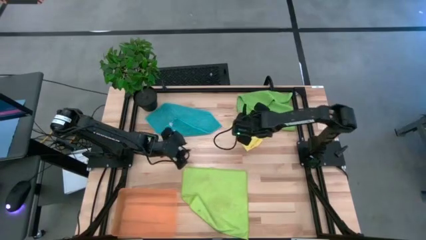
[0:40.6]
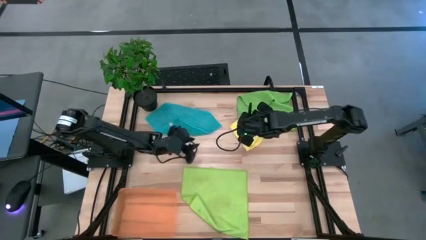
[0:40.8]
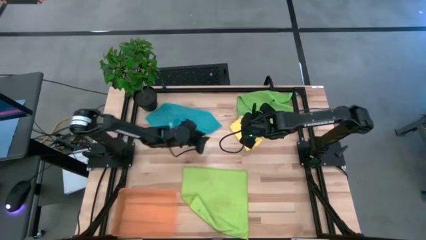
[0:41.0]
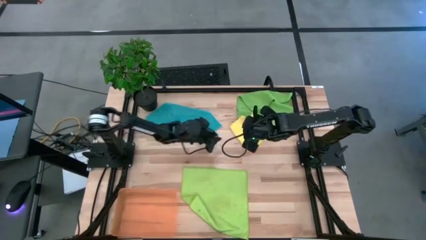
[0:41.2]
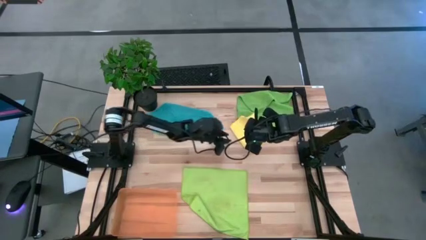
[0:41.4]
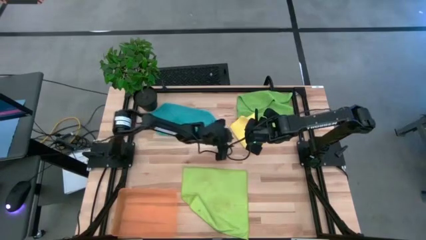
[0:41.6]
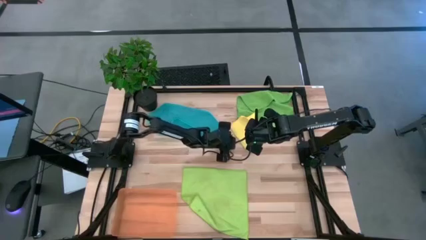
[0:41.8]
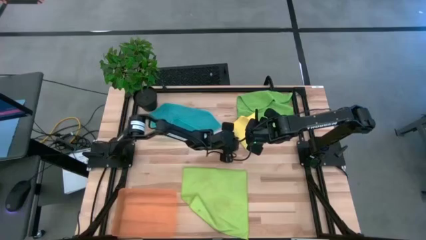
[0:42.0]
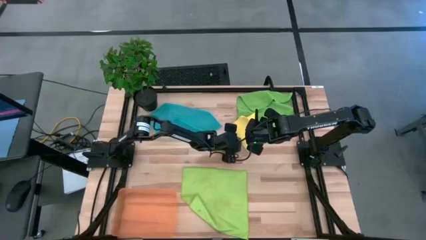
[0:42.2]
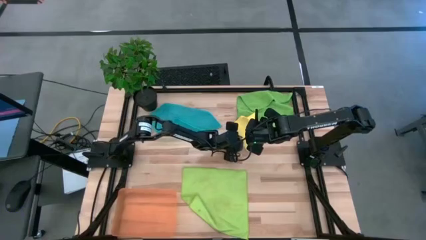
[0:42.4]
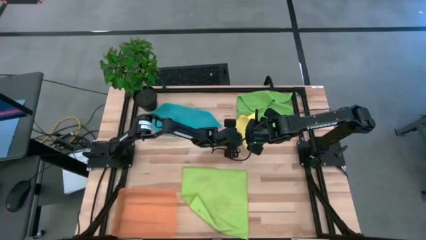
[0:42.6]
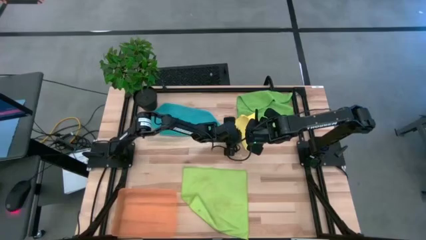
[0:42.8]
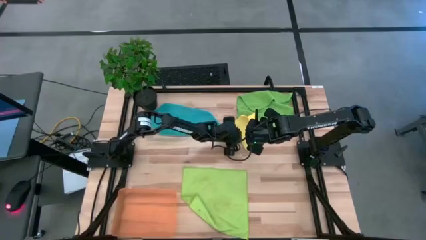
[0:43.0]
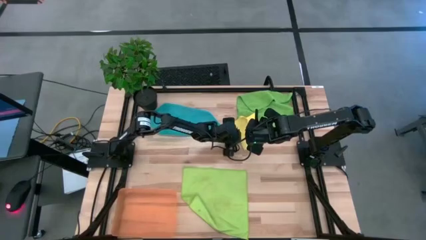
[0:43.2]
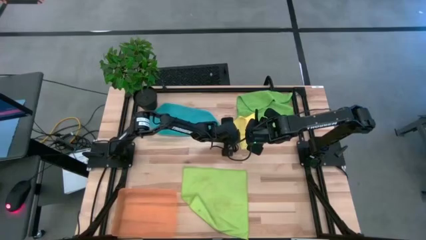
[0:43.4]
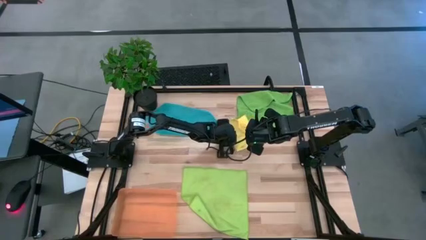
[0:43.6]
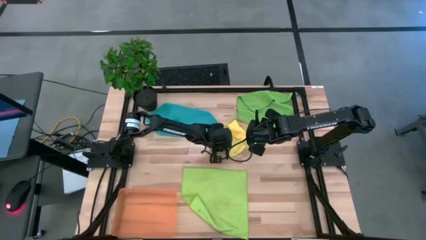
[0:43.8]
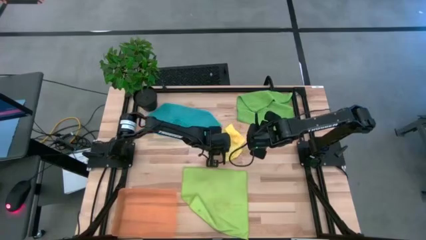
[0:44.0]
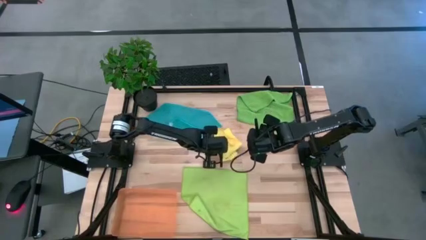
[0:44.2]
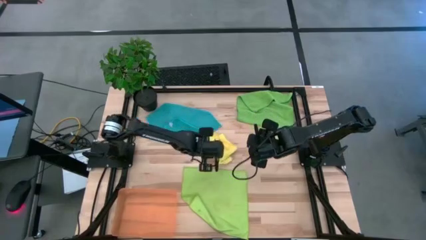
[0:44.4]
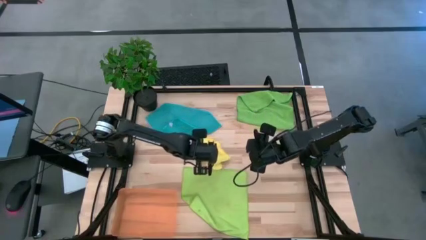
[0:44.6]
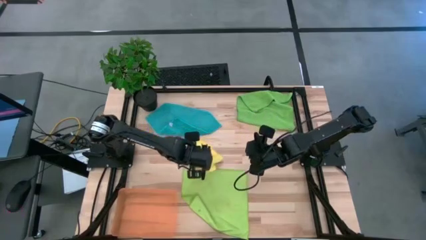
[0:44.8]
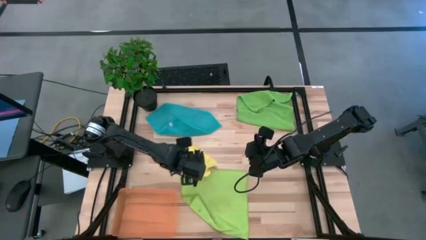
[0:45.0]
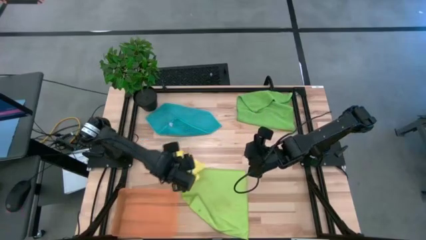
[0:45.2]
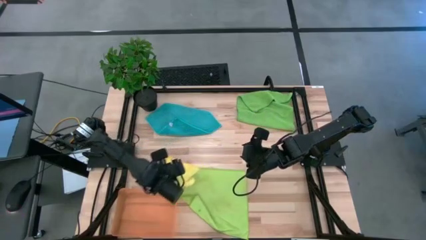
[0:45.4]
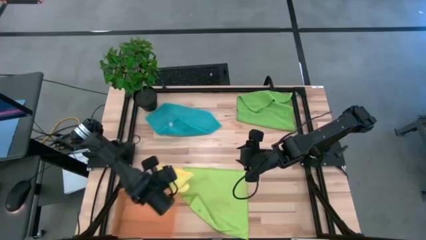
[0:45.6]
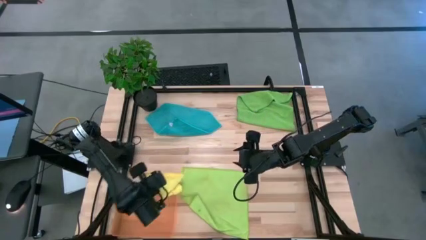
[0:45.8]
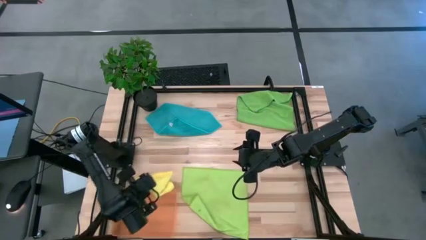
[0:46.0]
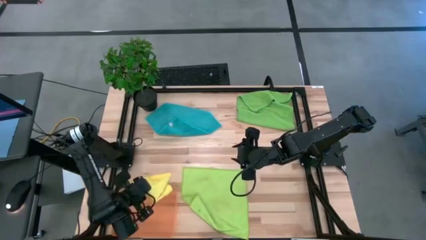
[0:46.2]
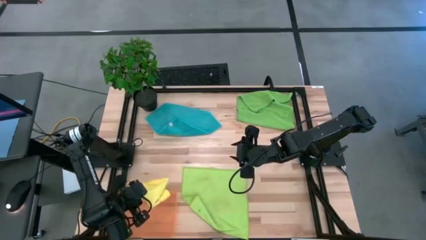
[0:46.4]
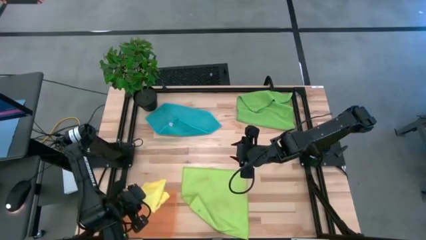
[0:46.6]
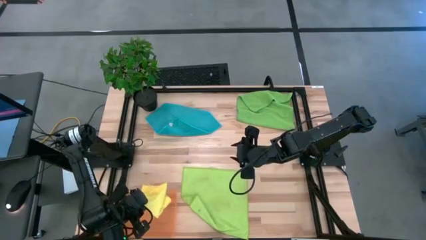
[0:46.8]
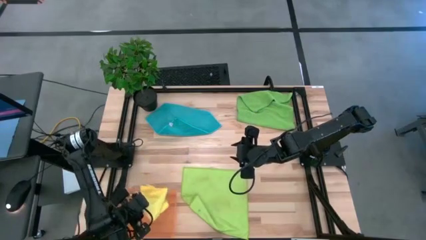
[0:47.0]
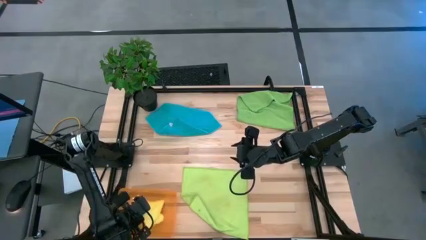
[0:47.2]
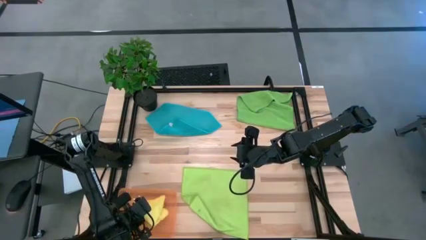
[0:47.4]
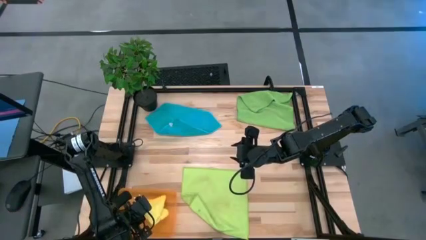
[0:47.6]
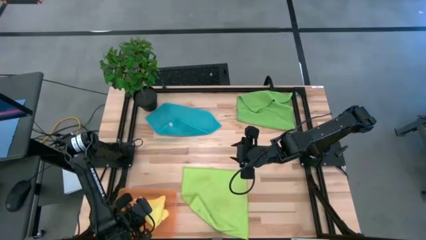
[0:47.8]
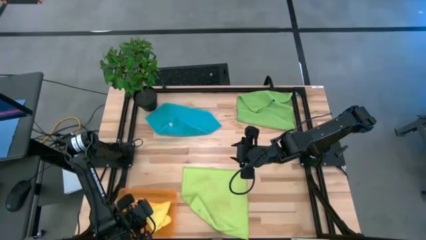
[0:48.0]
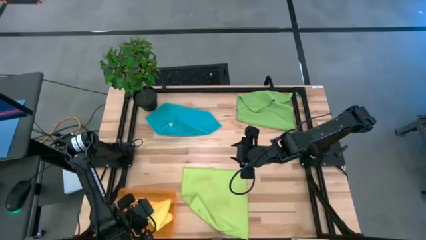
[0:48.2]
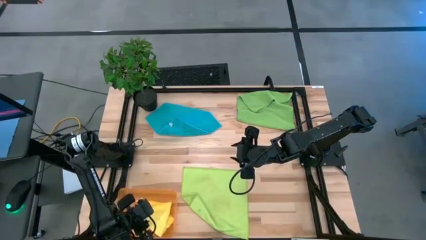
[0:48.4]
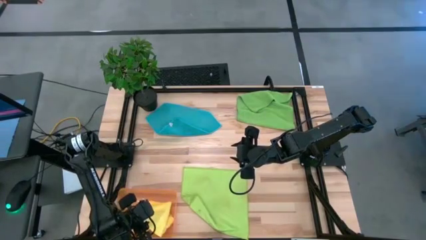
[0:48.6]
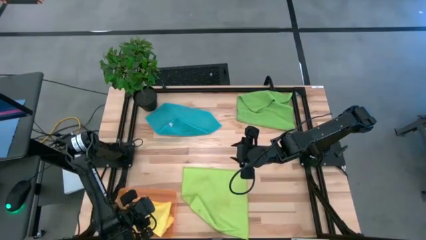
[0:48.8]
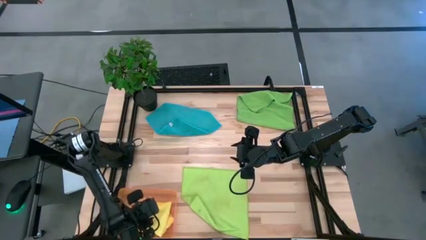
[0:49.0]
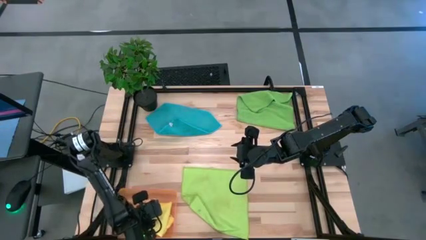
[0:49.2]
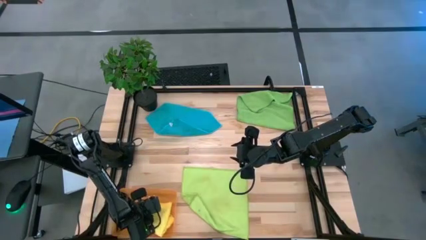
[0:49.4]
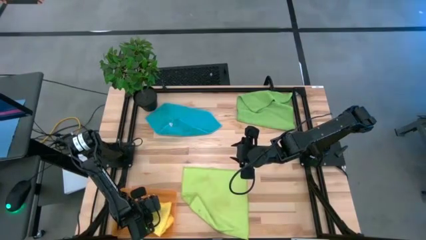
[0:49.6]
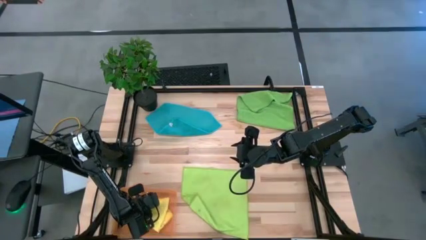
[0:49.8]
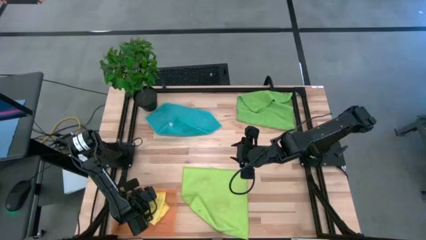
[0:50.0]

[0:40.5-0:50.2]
Task: Fold microfiber towels
Put the yellow towel into the orange bin

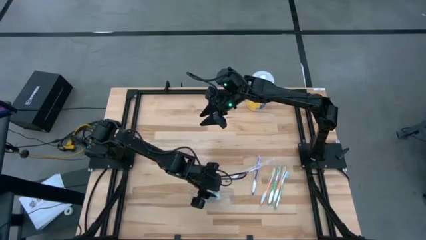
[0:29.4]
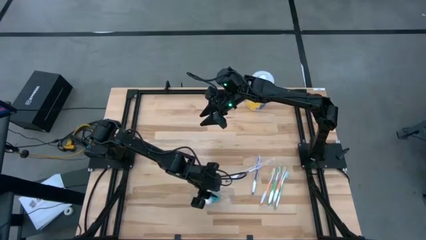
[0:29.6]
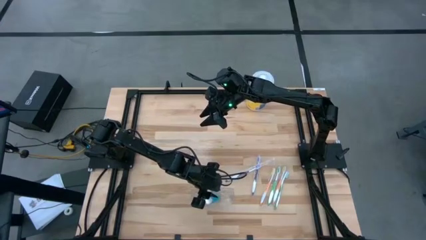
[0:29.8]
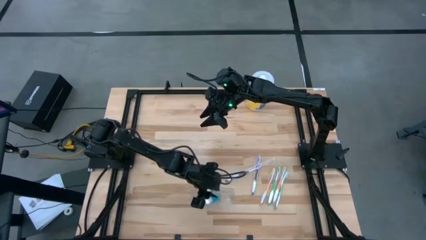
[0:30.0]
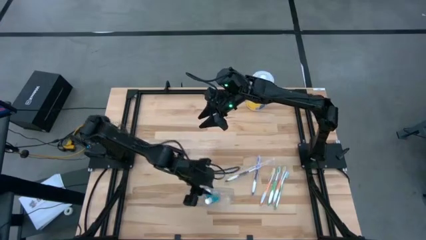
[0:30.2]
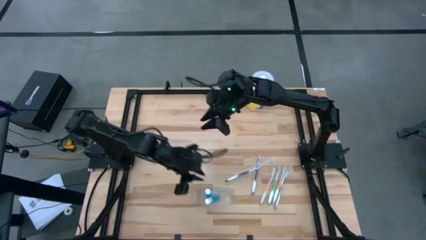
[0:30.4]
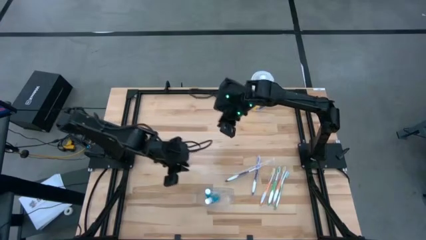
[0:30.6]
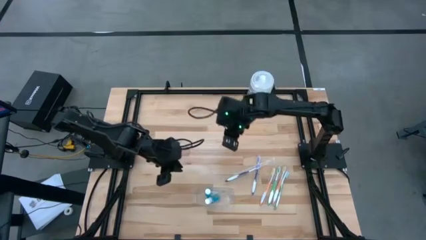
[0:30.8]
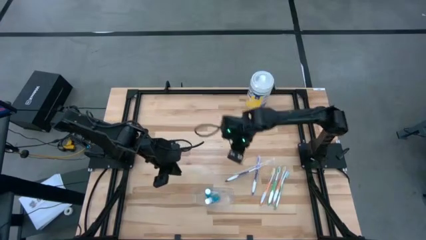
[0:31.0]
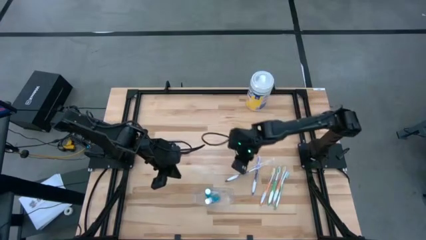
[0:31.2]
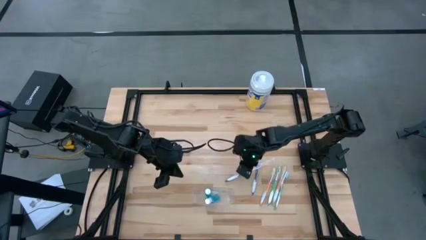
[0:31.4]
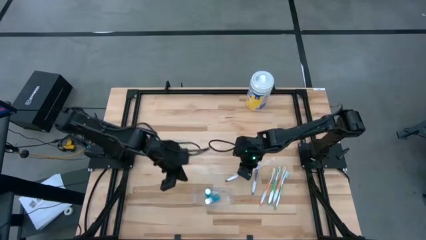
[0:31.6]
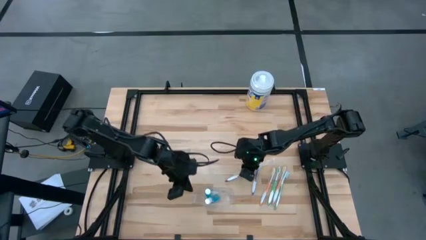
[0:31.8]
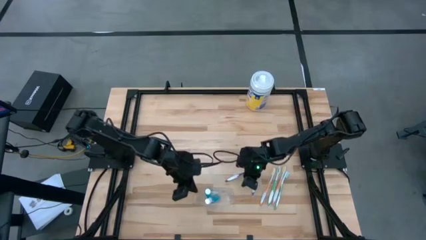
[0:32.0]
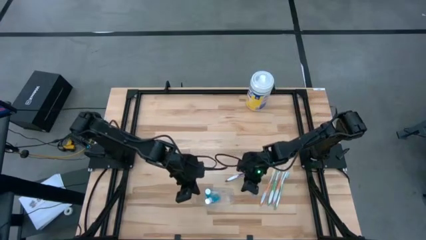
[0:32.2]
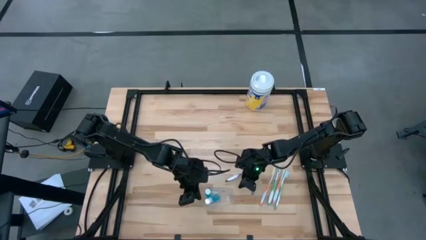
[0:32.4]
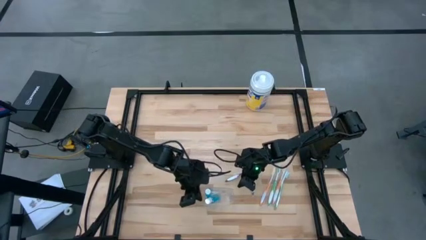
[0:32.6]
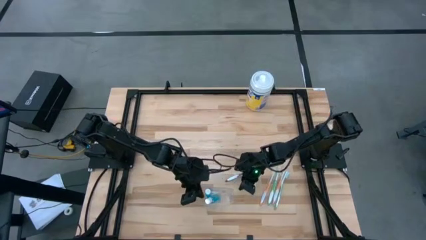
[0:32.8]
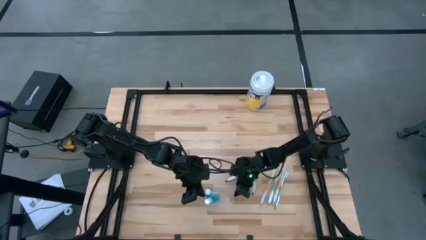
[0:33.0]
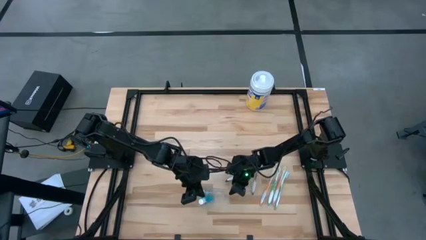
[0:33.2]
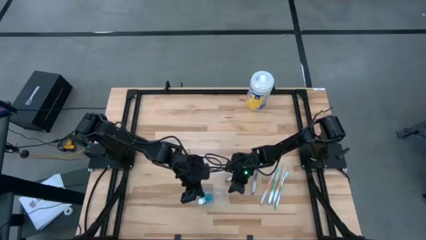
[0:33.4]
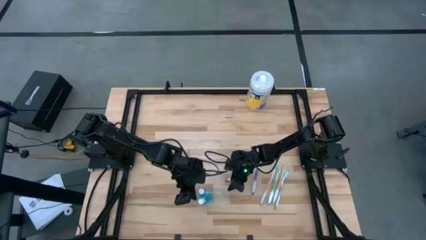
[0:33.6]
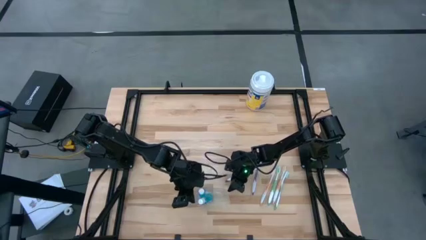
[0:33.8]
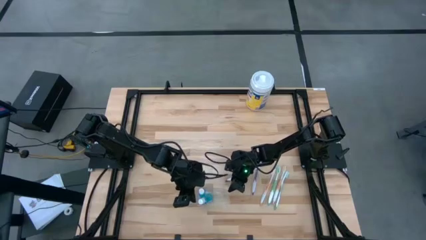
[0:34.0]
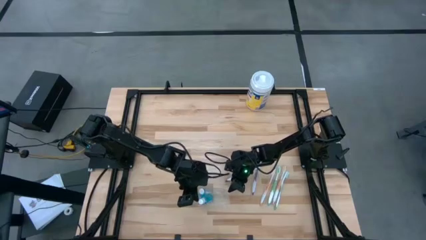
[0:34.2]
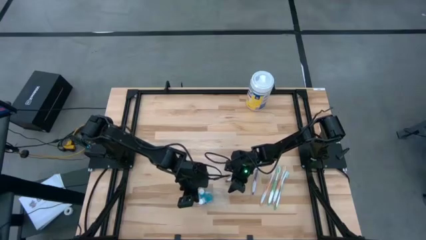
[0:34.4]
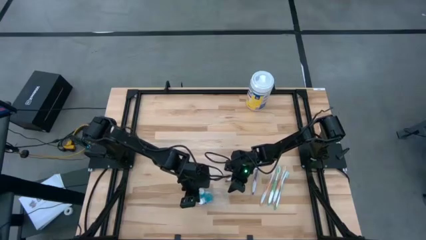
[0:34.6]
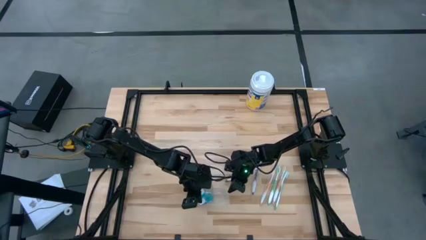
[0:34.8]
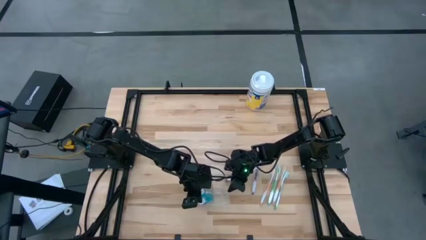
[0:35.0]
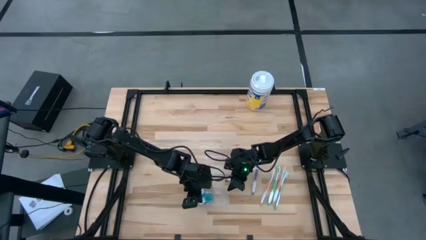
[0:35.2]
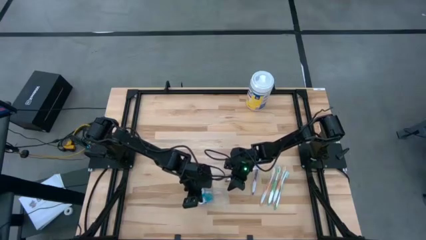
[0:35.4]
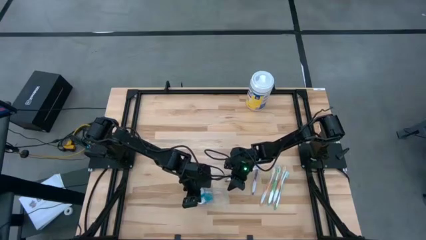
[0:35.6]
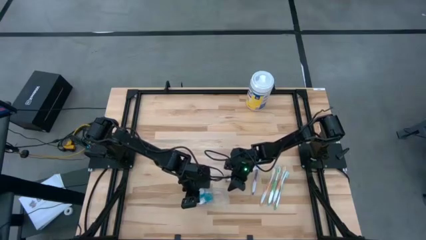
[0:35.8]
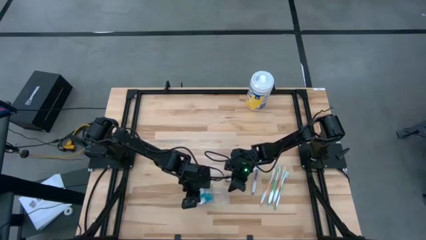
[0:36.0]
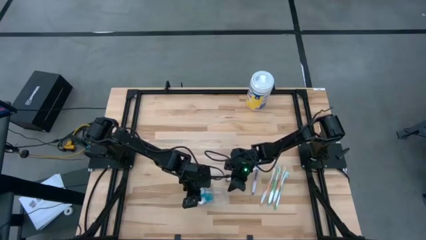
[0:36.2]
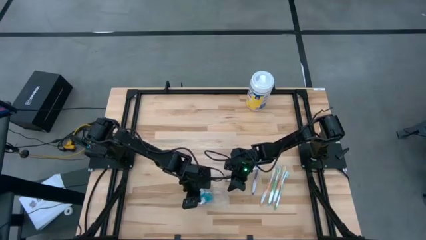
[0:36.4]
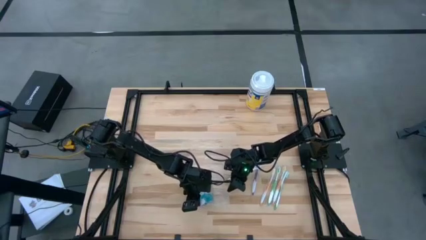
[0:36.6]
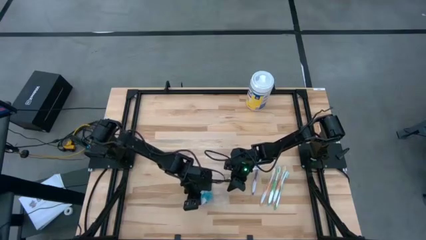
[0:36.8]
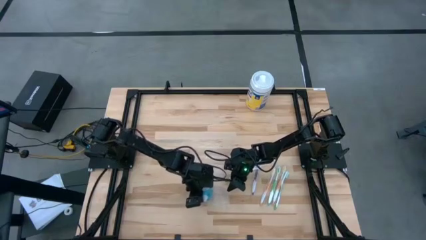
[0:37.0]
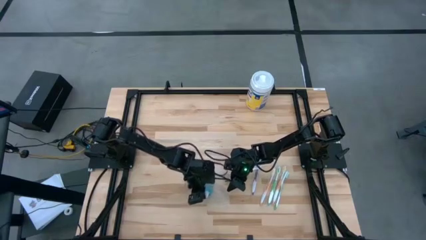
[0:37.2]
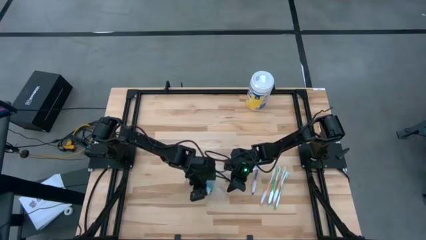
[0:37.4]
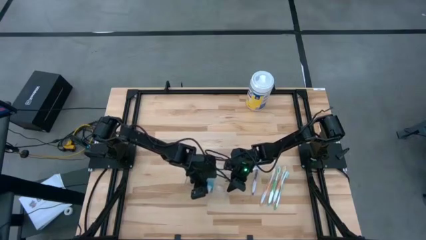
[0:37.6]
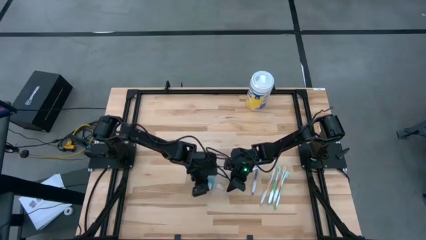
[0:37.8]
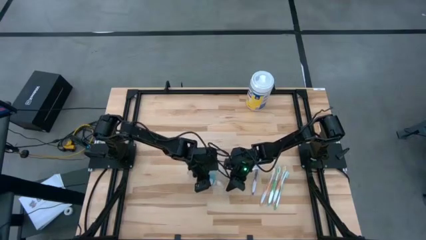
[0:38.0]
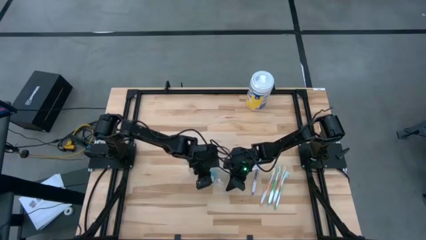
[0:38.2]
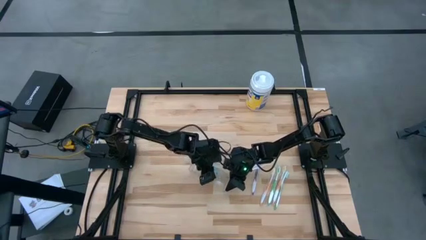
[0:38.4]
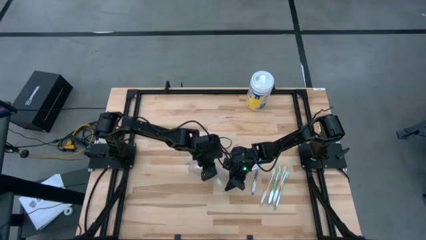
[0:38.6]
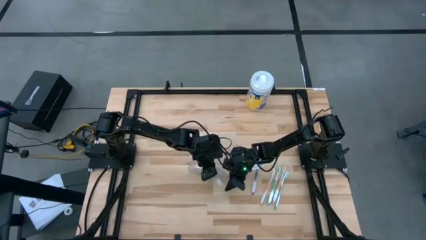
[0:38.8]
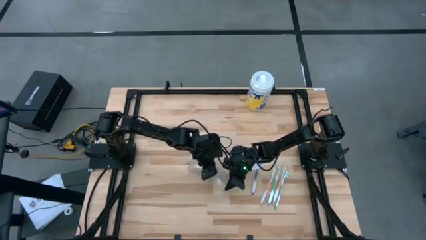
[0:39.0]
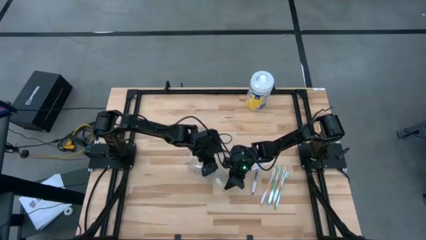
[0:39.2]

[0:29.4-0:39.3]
Task: Pick & Place toothbrushing station
Move the transparent organizer to the center of the table
